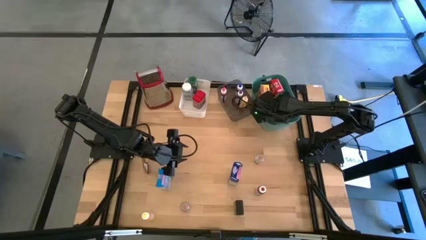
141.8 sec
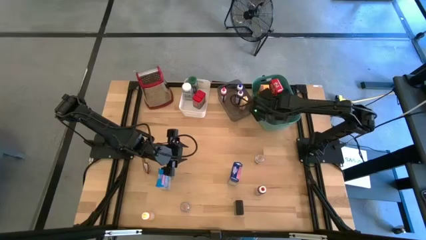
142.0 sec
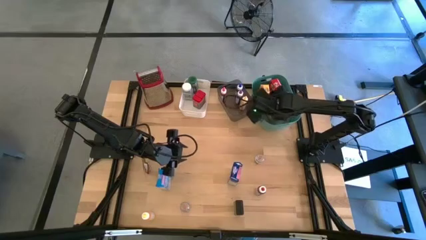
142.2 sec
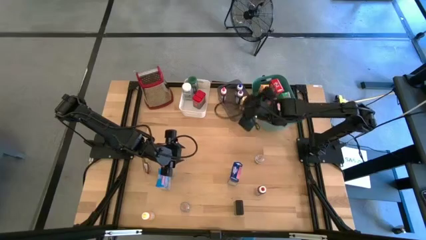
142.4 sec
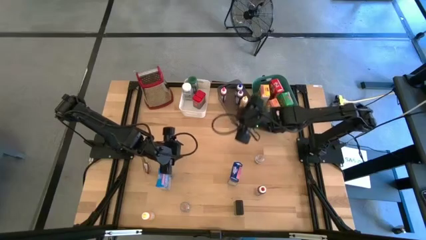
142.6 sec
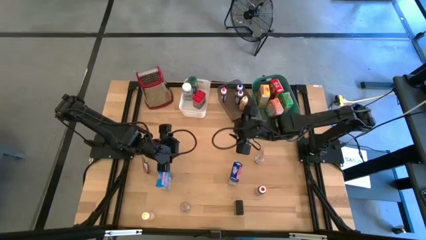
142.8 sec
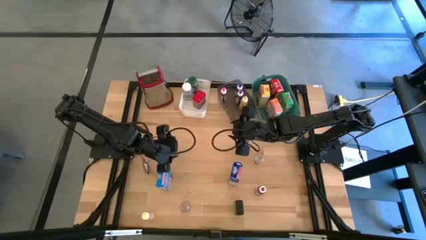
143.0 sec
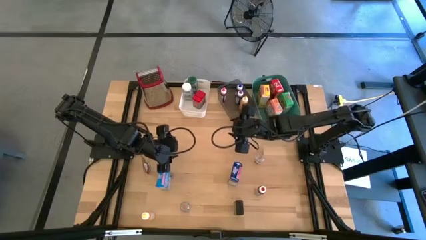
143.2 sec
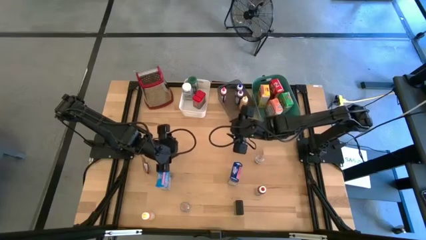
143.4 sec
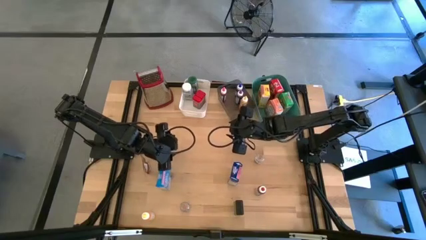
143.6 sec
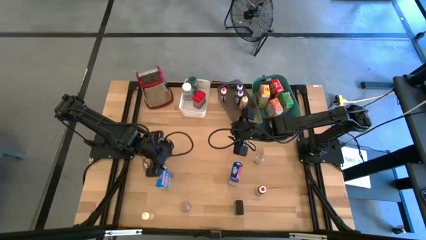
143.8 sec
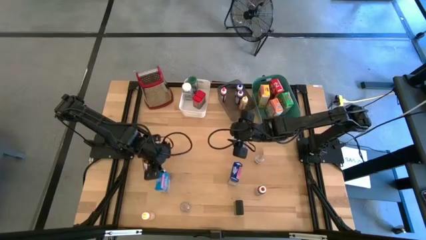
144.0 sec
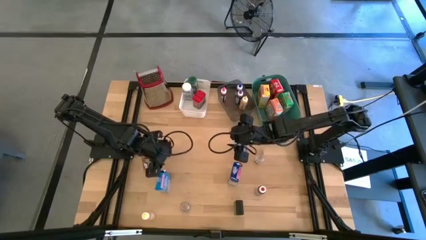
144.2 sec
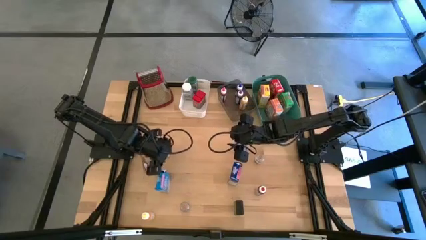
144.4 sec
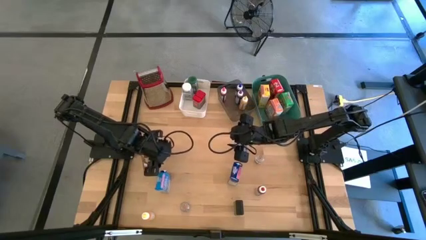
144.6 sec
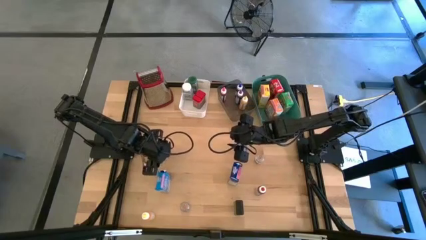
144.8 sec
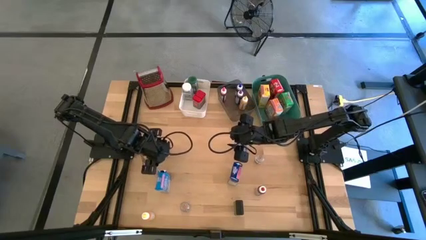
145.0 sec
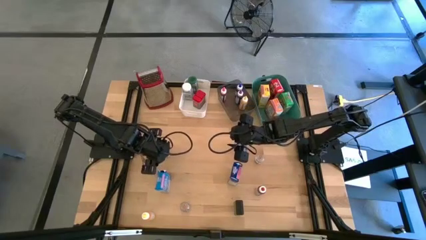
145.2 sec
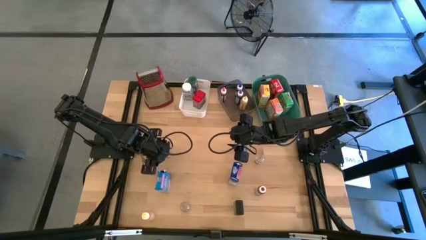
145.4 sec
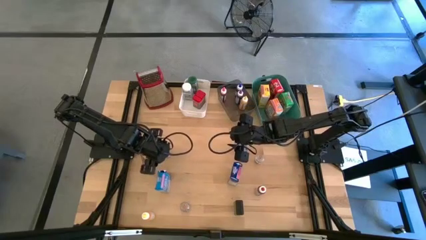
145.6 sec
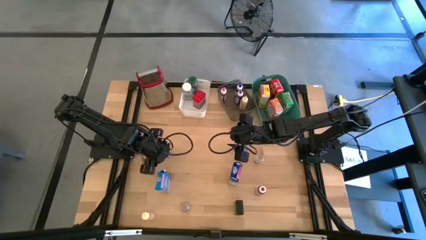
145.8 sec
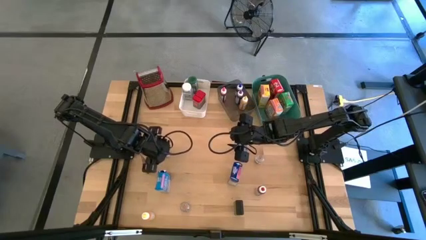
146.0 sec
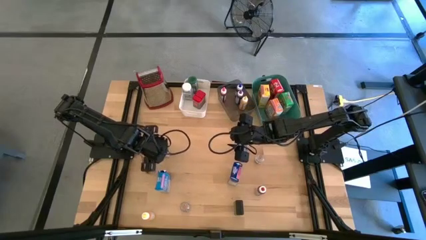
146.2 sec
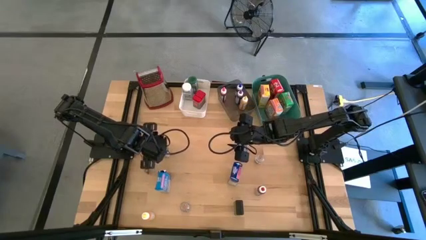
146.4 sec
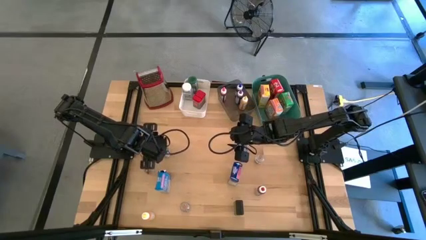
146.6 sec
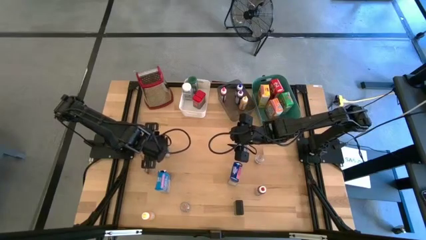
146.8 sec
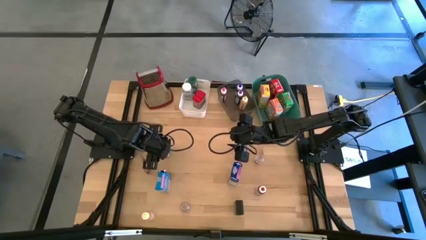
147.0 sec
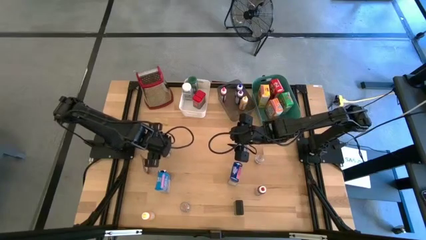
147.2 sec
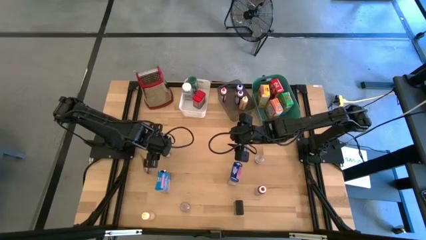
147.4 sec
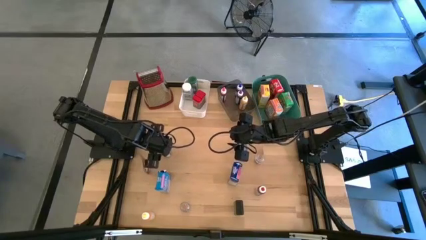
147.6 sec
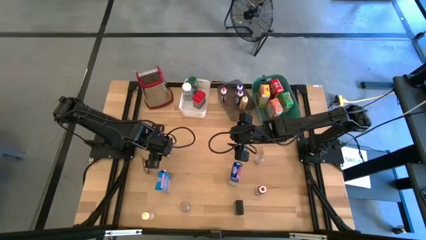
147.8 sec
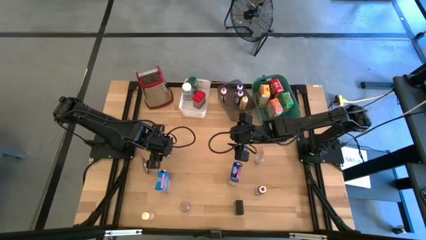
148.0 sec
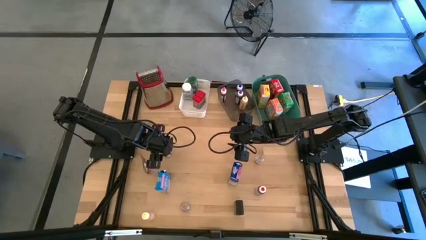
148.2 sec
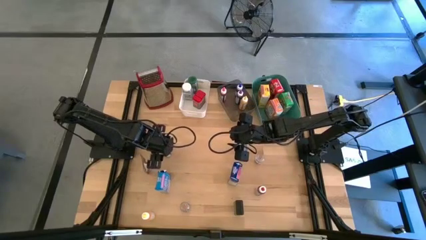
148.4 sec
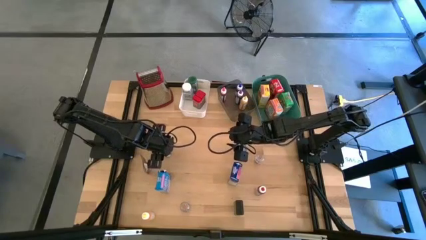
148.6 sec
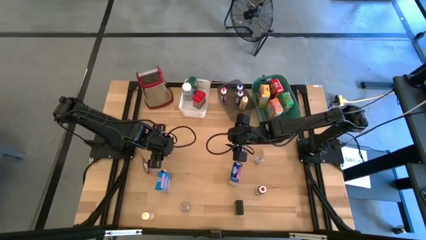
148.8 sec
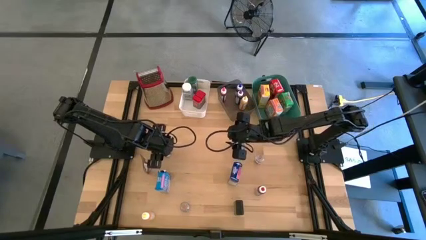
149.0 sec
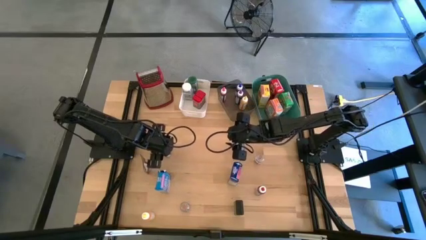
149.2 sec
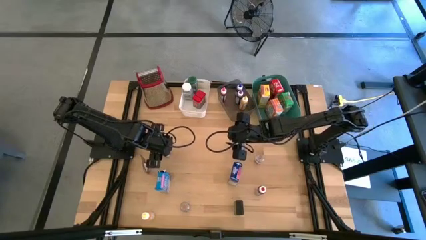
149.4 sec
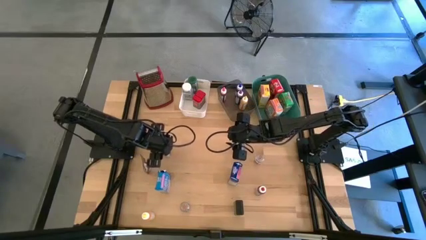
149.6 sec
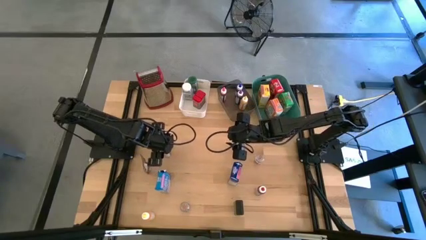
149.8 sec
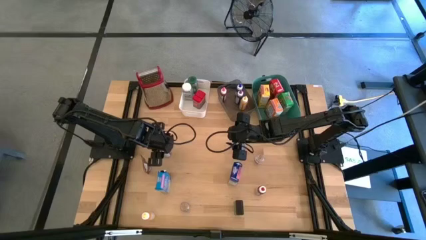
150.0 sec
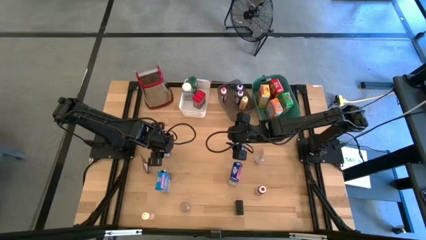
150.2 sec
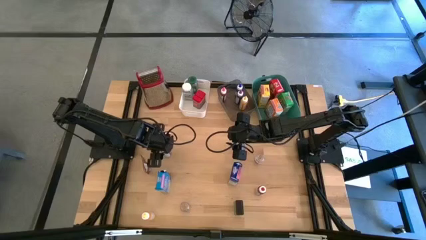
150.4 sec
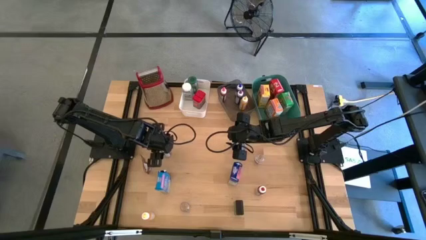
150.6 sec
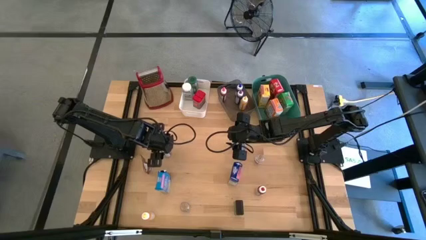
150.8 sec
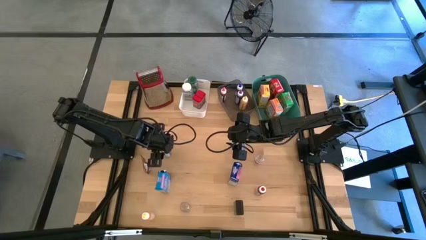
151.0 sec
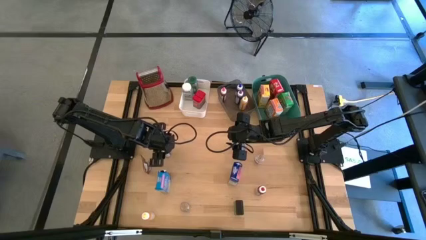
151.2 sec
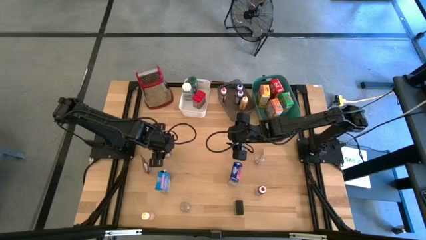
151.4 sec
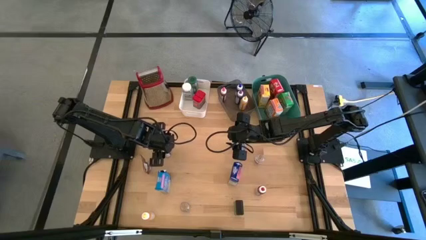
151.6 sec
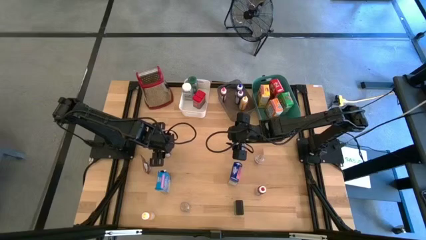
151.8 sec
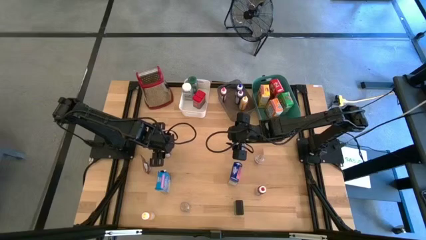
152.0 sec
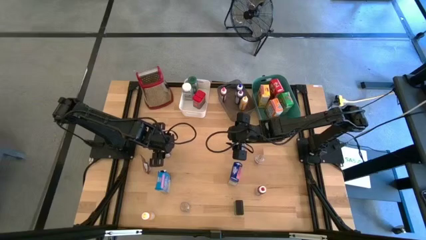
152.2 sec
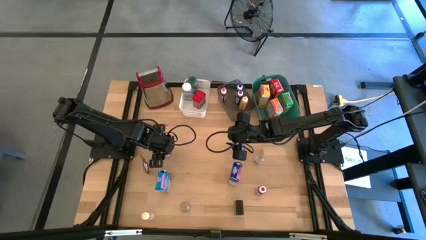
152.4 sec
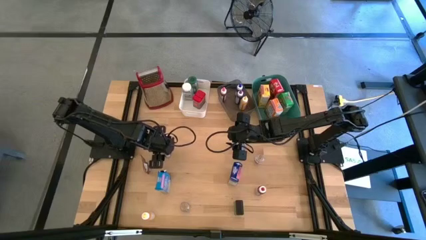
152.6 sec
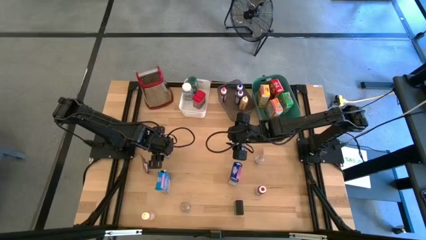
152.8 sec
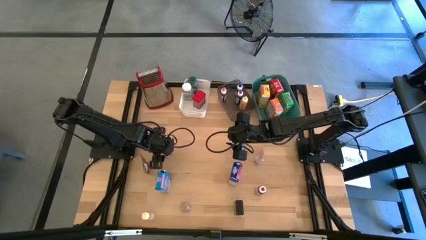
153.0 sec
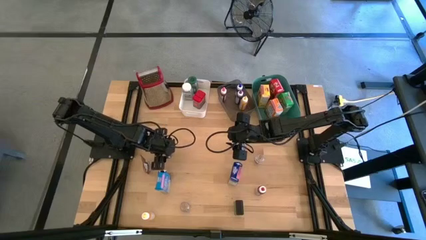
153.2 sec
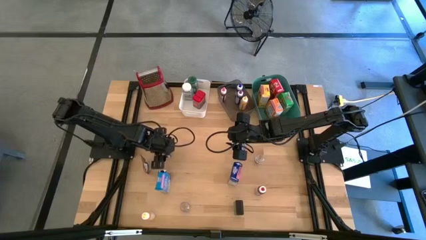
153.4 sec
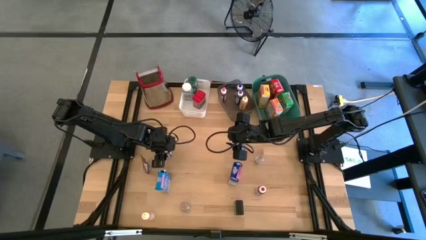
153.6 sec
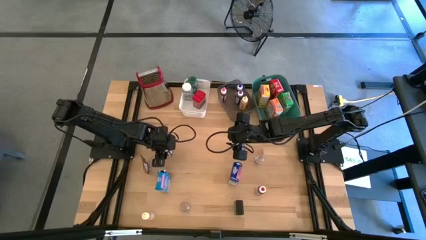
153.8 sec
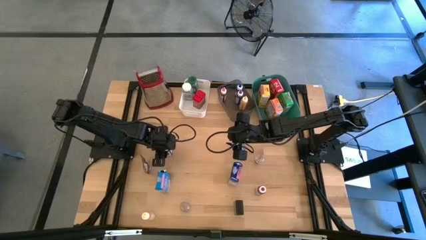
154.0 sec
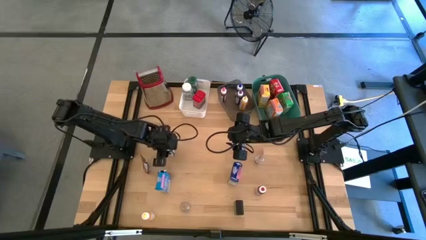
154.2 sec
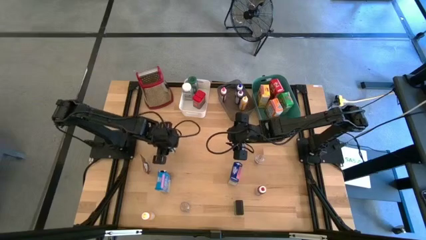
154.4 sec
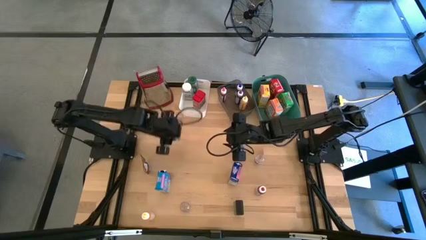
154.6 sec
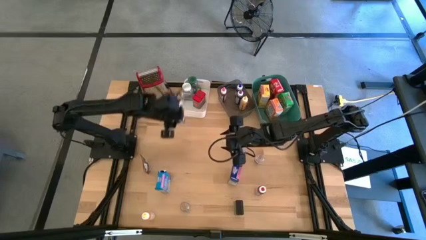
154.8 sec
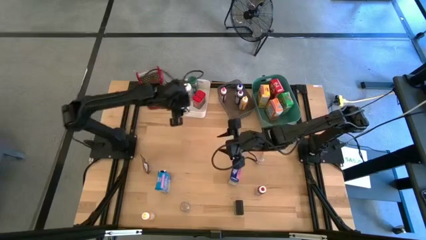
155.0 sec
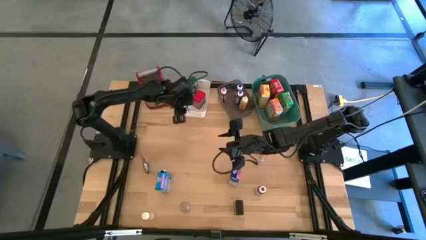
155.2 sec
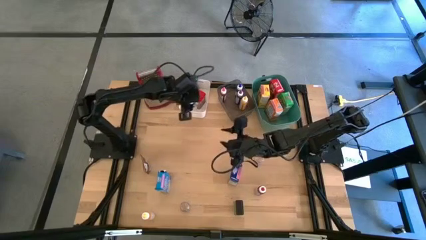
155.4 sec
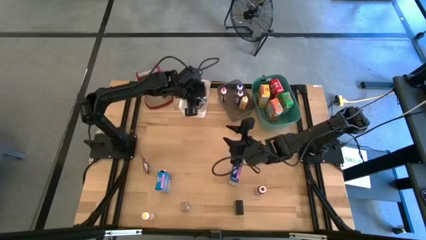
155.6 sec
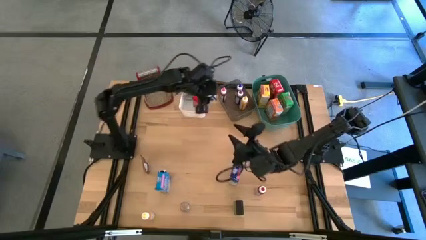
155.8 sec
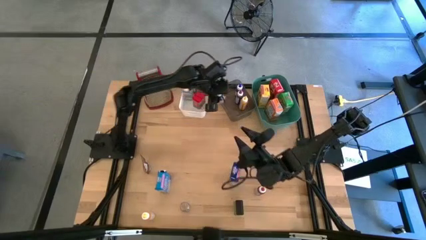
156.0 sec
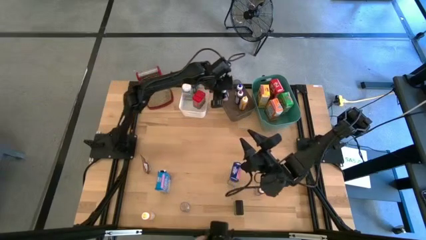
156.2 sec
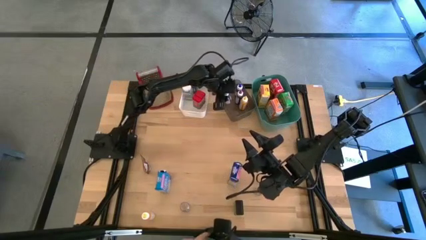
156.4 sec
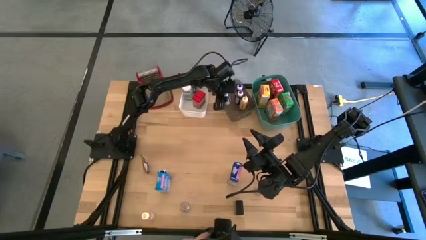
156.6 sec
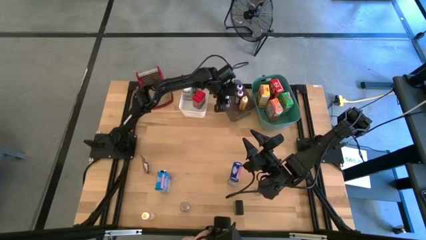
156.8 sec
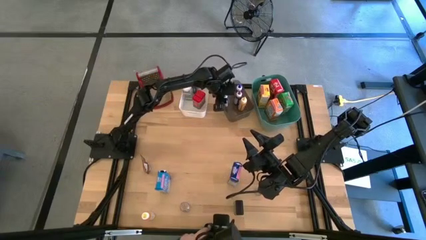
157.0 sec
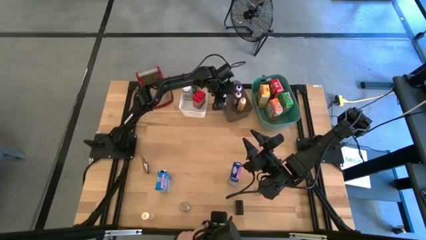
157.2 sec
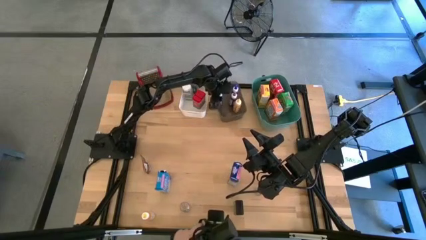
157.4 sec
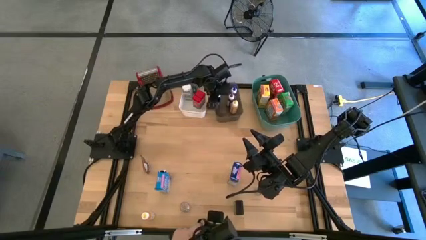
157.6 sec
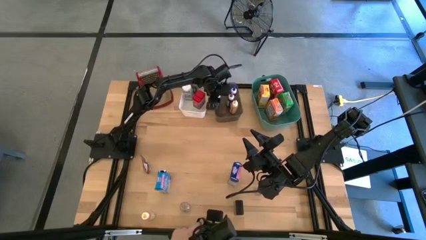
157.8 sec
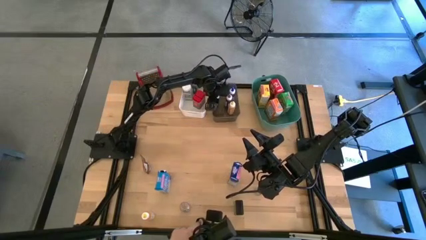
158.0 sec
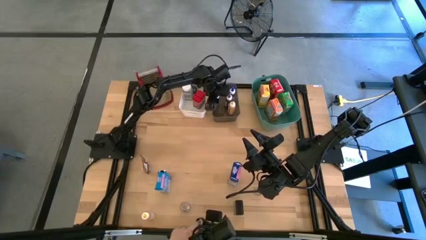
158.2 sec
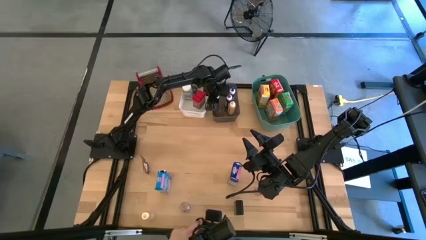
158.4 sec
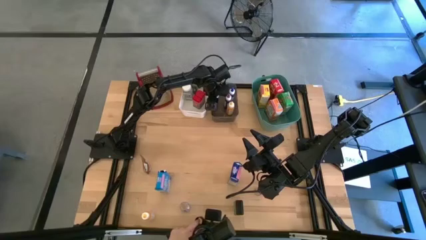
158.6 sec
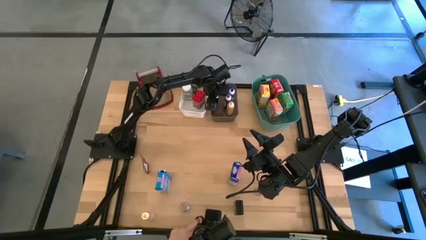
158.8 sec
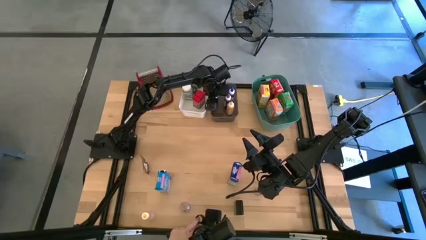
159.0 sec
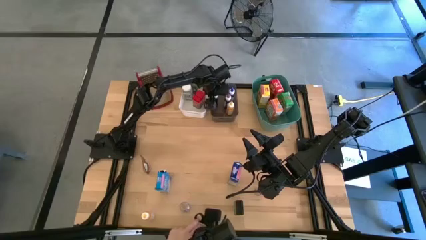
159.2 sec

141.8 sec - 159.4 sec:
Task: Pick & Place Kitchen Items
Put the green food coloring bottle into the black bin
